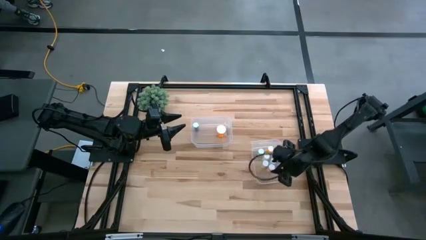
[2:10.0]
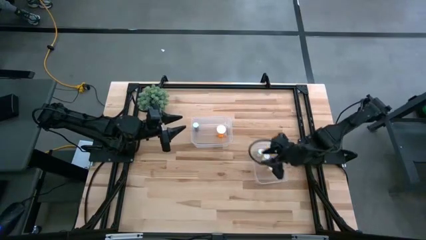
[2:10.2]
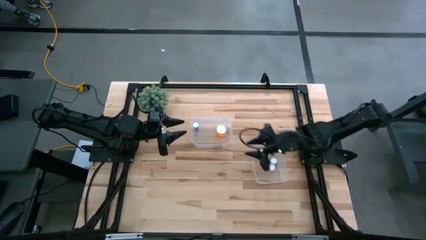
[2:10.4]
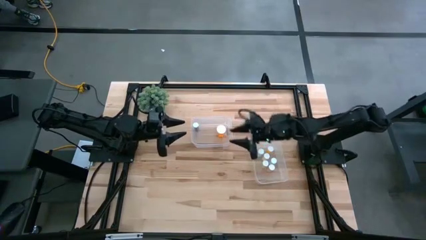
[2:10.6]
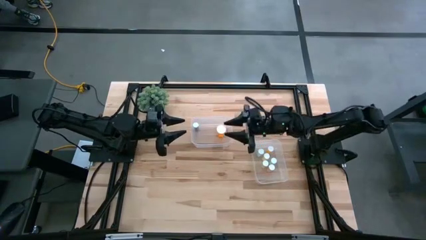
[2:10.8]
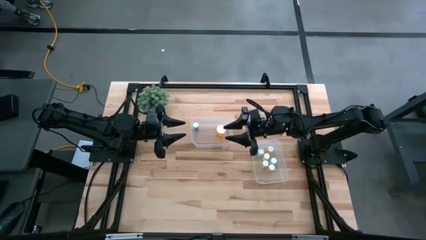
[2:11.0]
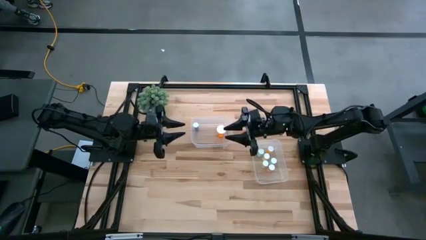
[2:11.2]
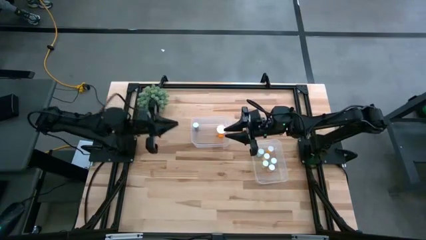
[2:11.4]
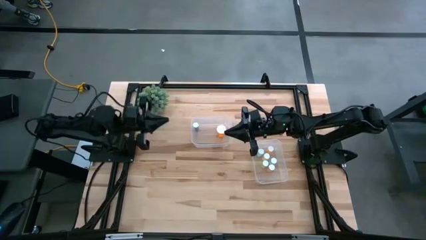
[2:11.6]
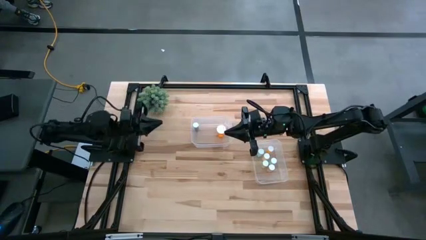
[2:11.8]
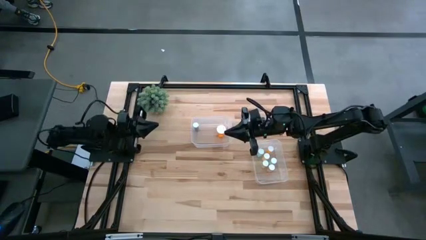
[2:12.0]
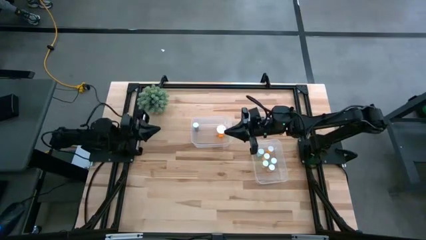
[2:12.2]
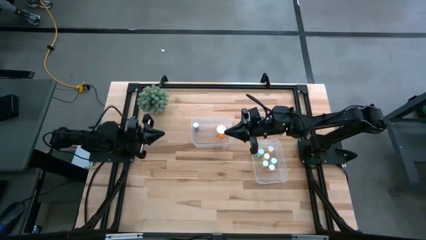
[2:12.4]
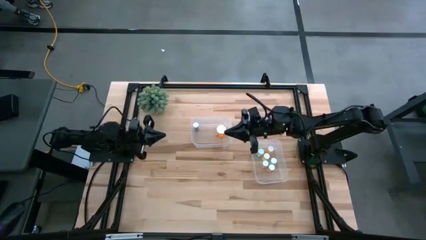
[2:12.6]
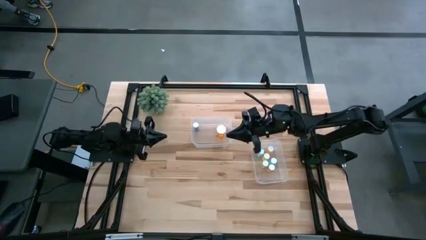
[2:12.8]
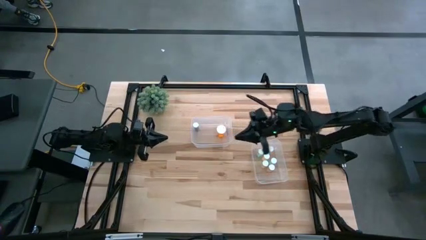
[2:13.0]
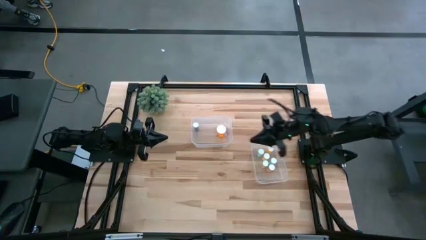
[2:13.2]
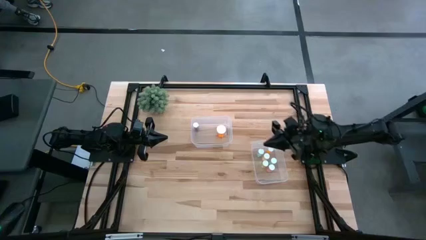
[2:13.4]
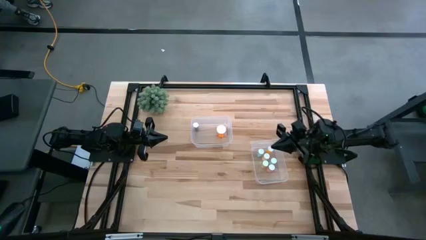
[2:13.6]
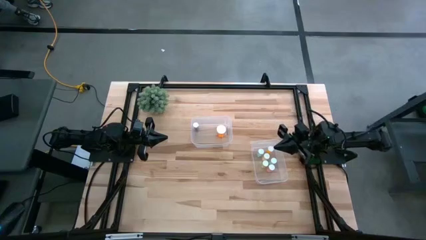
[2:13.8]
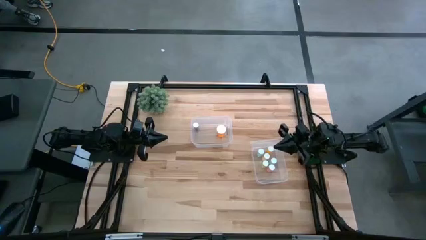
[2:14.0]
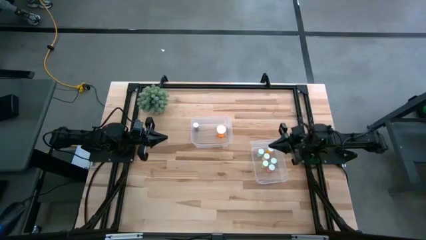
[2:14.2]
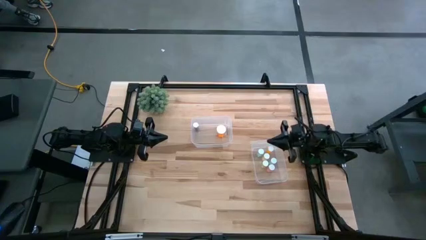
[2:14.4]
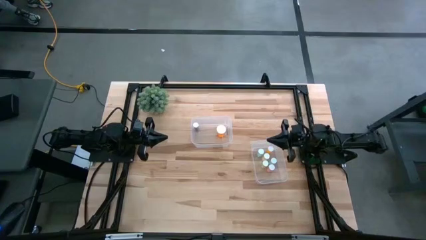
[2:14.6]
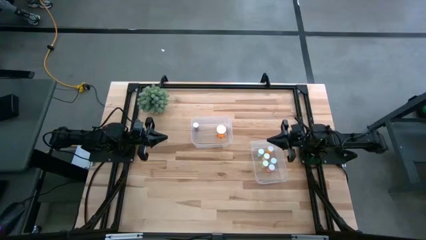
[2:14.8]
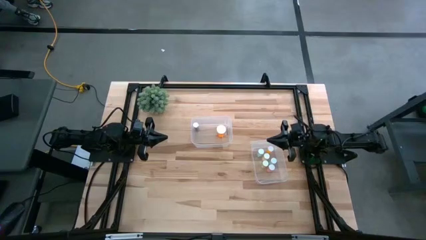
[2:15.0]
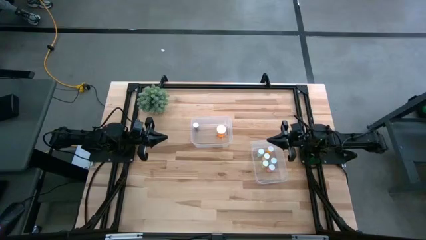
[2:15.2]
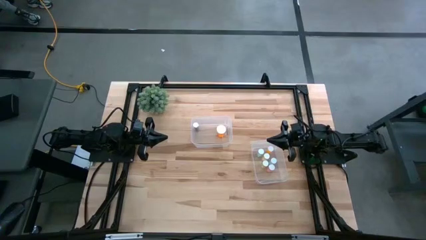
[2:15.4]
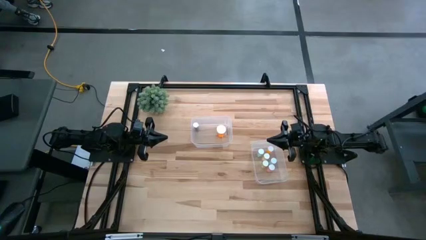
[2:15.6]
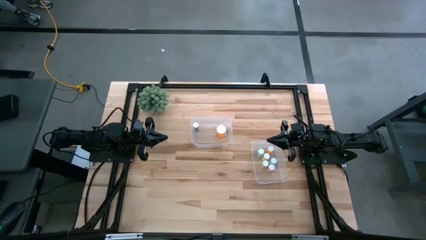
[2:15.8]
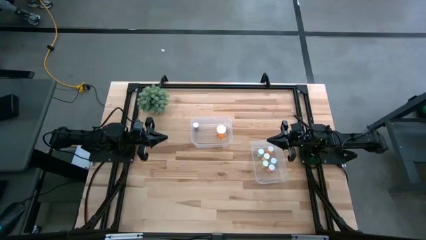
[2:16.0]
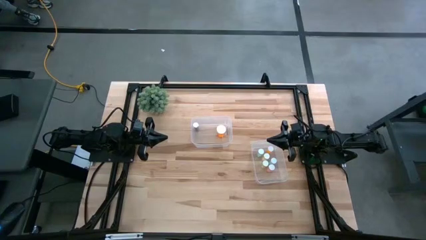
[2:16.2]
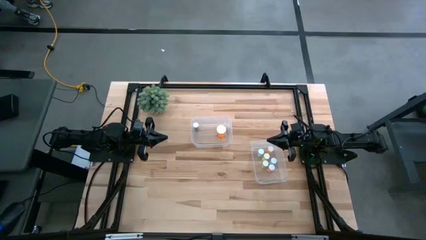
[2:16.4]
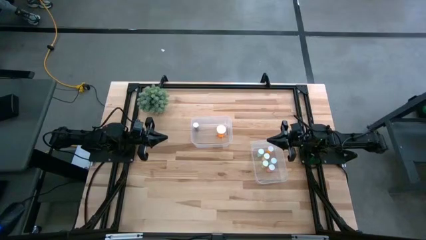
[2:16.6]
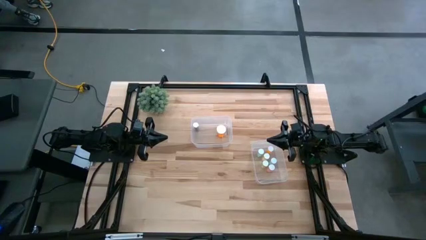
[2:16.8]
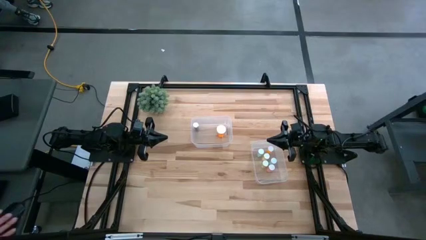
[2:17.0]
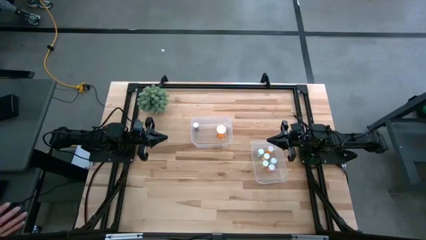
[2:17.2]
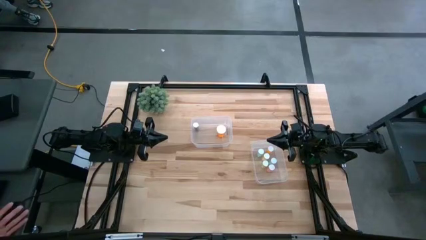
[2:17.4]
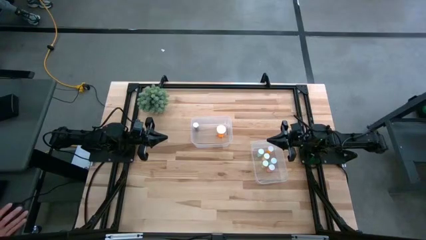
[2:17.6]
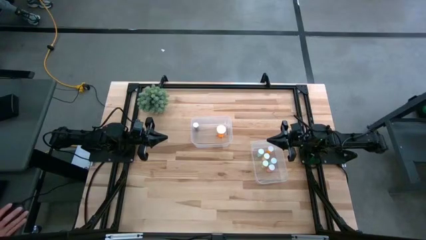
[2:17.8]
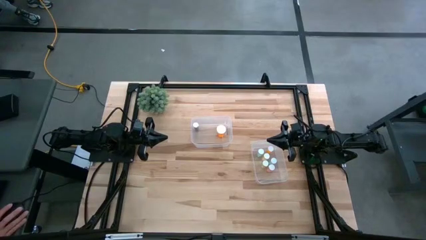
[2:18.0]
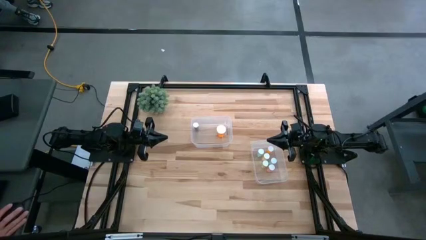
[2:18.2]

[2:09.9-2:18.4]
Task: Pick and place medicine bottles into bin by pill shape (circle, oval)
Return to Home Position

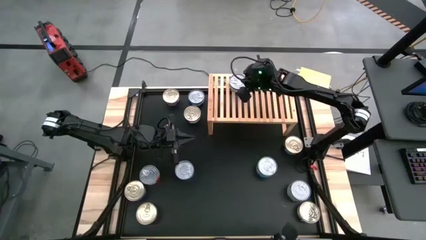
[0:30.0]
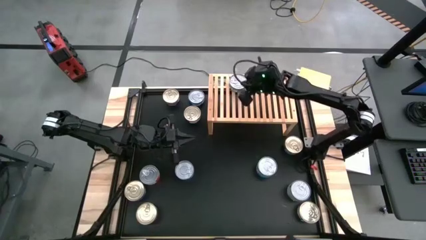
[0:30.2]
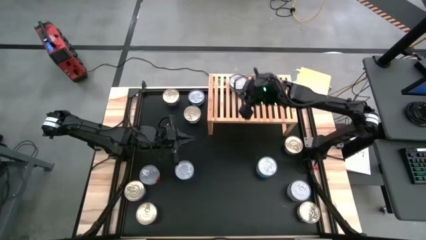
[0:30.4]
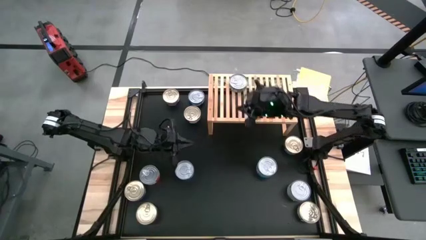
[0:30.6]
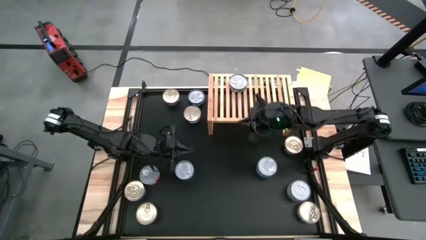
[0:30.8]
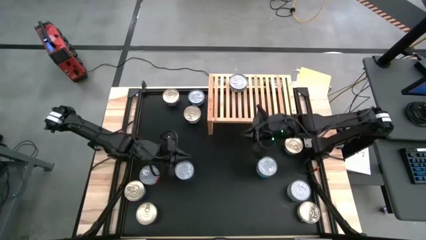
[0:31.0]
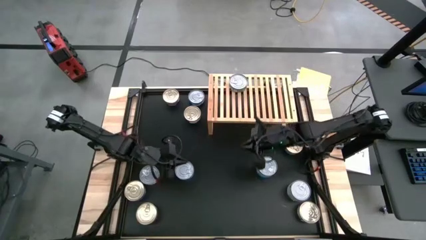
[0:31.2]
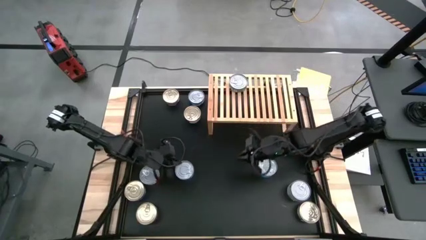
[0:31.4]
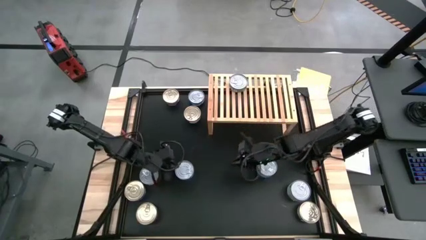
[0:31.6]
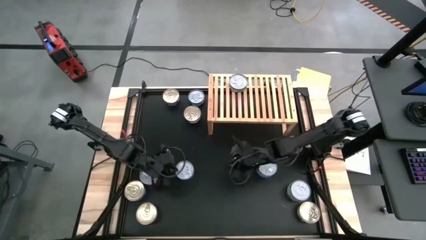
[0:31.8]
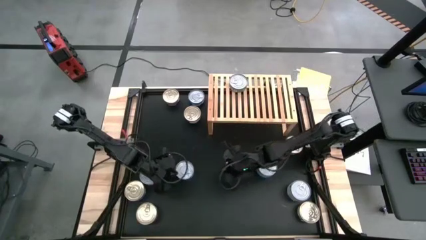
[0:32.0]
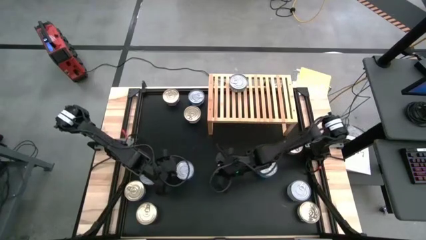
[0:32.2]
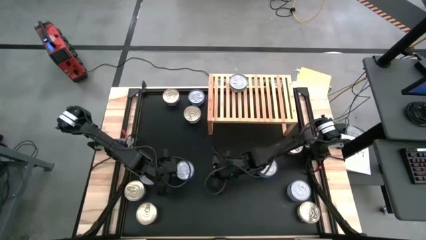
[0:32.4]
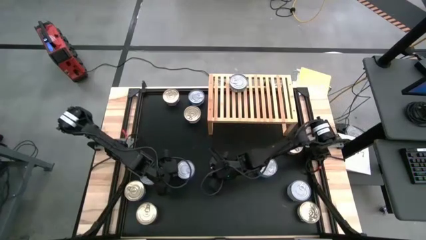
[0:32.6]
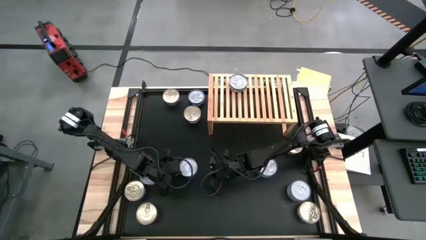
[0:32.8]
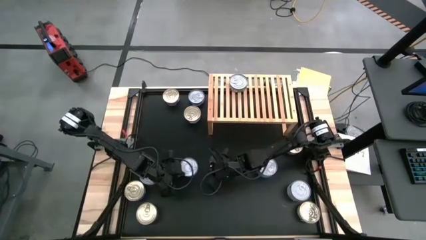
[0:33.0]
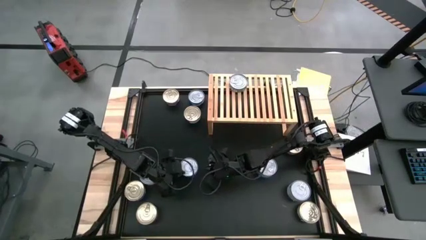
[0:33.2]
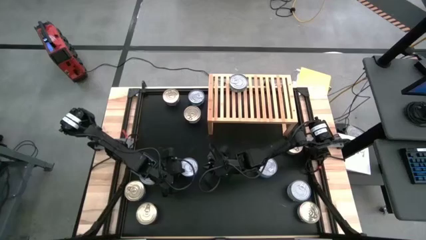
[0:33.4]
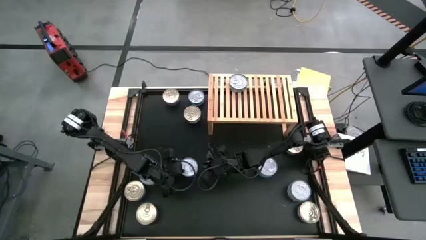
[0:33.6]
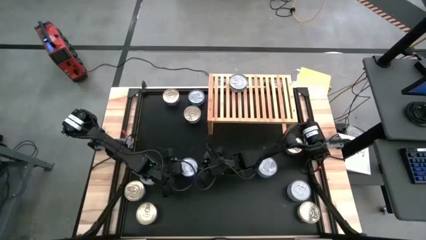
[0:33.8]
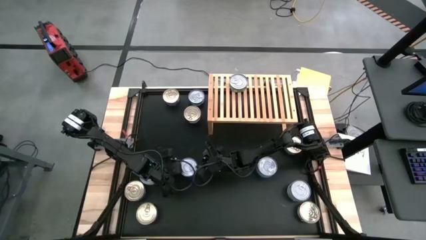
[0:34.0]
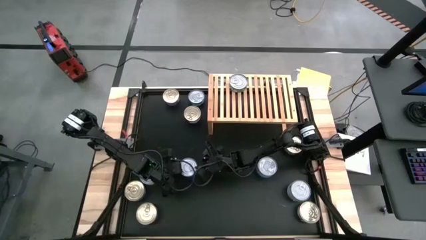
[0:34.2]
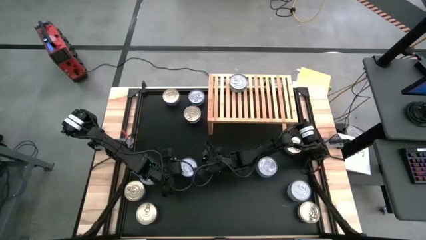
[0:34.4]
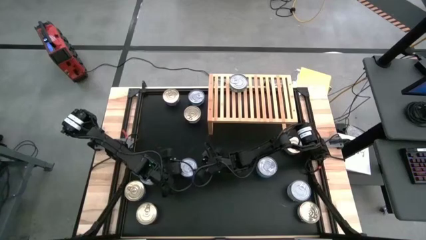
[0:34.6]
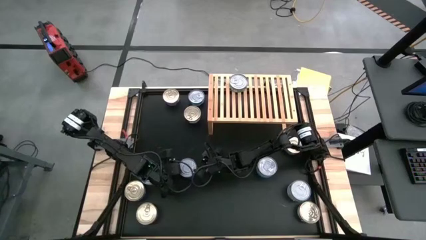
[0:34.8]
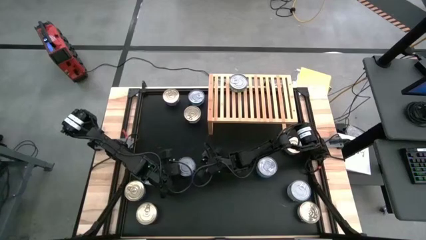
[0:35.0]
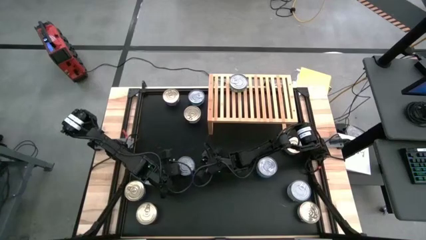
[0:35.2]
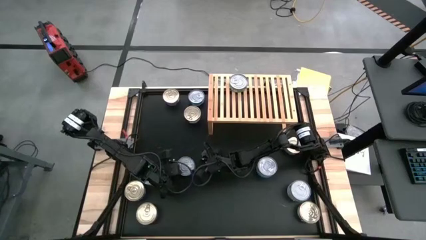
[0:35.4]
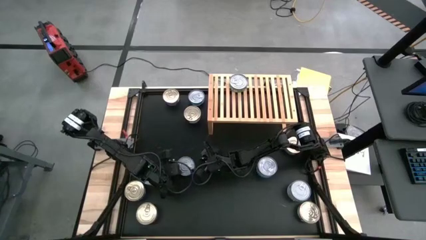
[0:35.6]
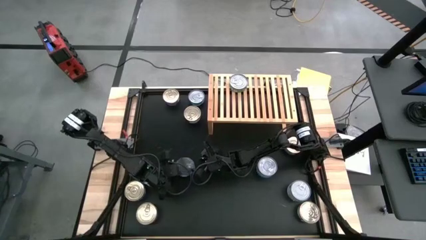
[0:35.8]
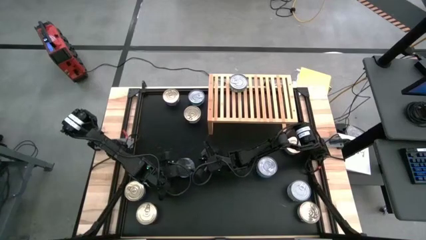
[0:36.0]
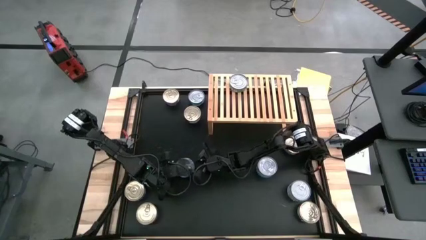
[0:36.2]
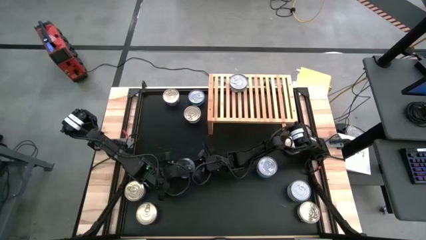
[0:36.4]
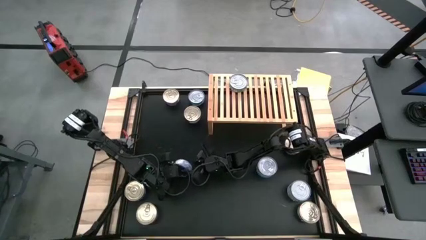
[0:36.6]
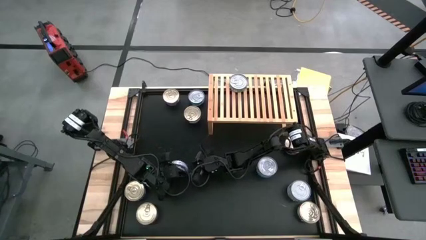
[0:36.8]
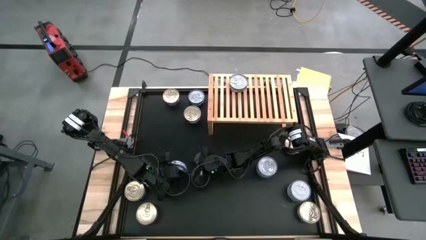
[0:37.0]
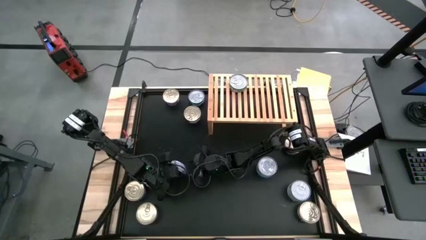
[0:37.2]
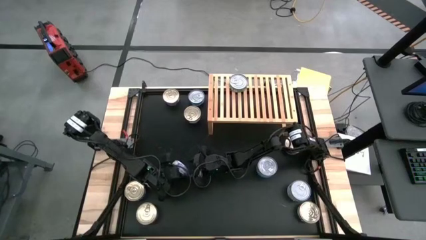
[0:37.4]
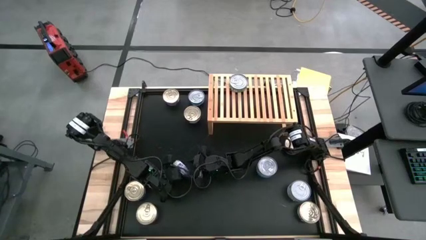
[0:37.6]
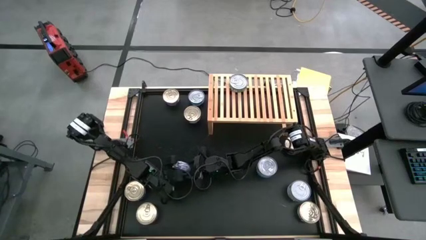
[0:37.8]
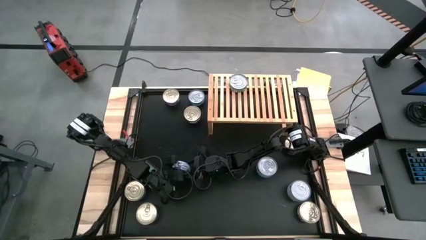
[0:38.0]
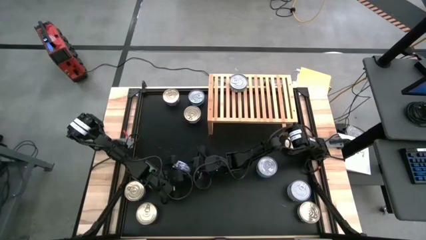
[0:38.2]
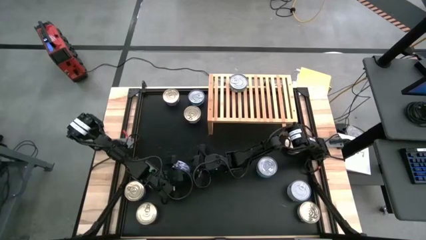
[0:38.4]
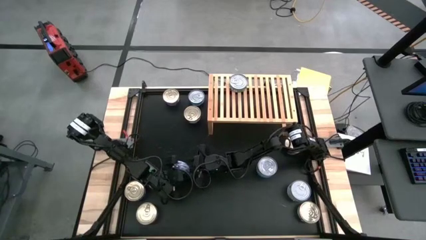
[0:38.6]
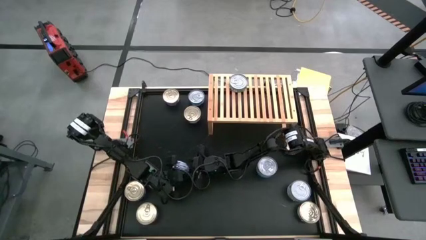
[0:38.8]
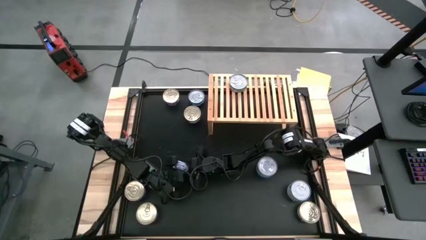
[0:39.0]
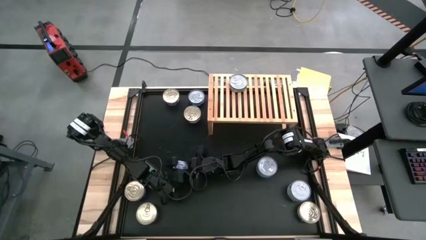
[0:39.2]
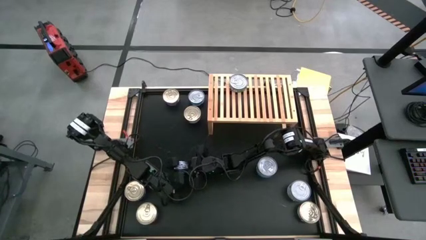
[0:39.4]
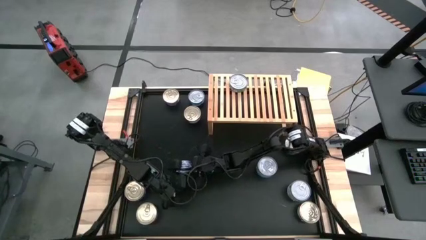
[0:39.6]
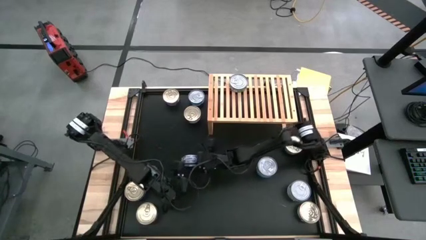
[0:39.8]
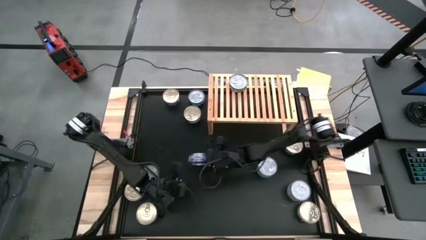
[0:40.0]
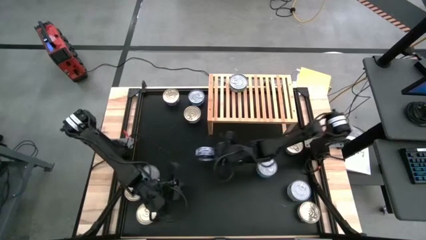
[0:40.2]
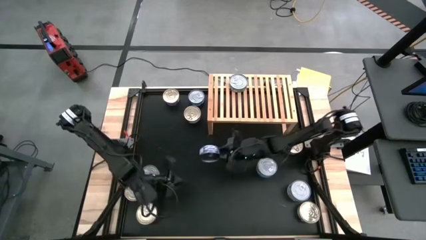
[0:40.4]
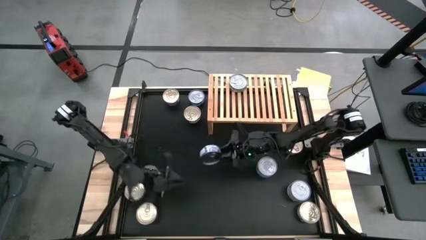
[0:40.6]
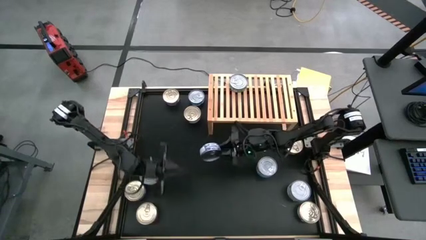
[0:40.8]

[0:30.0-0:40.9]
Task: Stack canned seafood by type on shelf
Put the blue tuna can on the shelf
